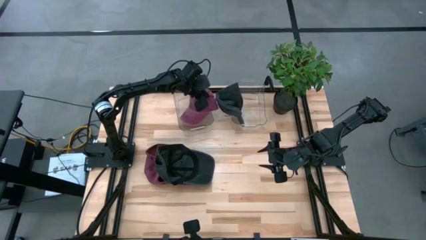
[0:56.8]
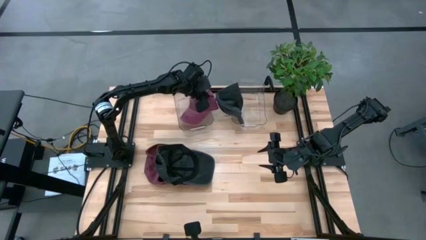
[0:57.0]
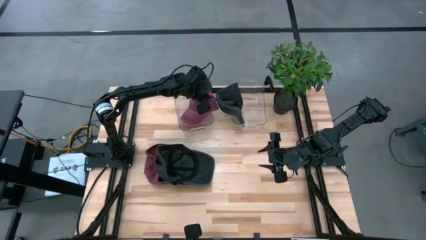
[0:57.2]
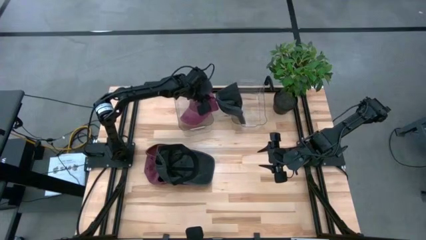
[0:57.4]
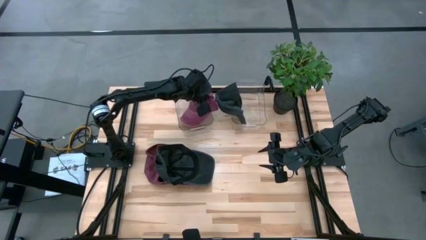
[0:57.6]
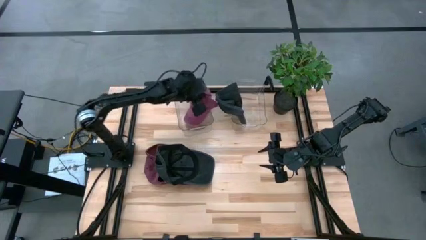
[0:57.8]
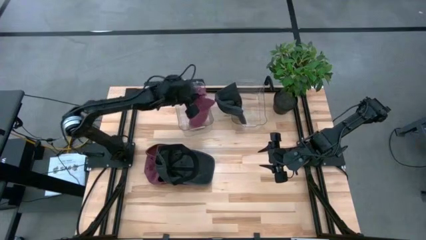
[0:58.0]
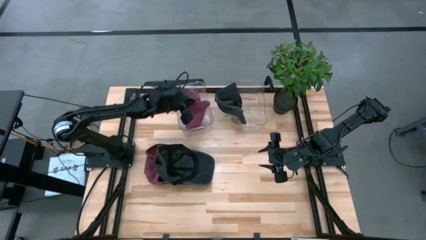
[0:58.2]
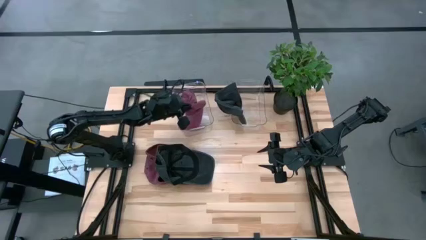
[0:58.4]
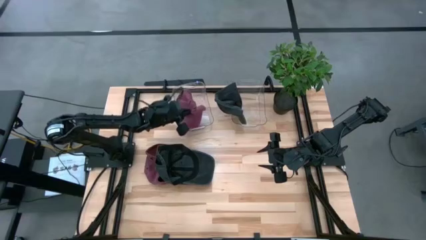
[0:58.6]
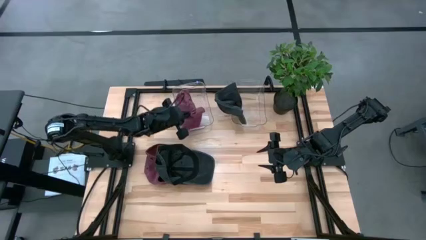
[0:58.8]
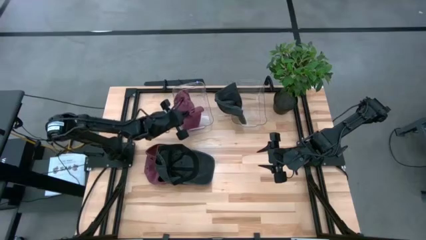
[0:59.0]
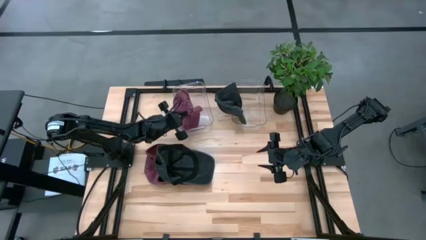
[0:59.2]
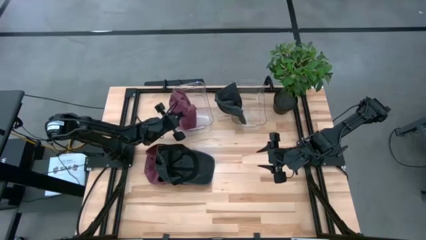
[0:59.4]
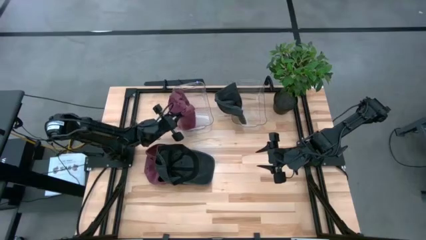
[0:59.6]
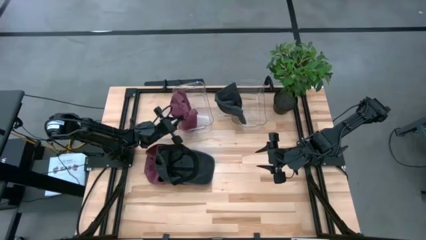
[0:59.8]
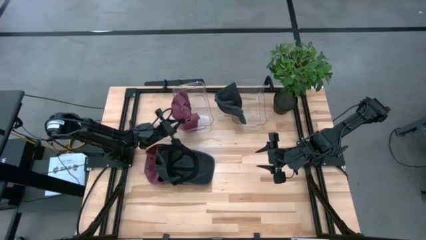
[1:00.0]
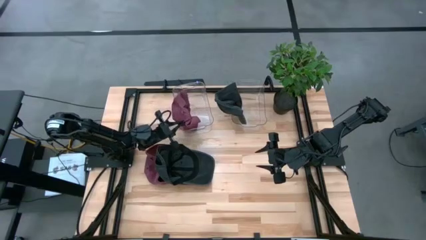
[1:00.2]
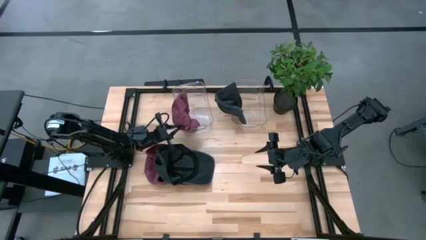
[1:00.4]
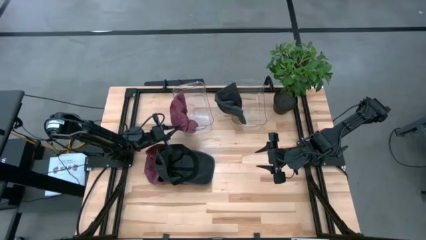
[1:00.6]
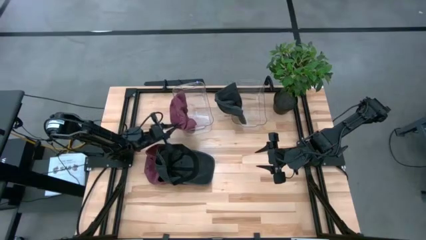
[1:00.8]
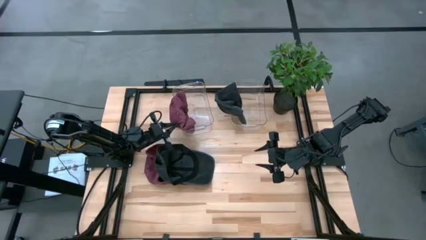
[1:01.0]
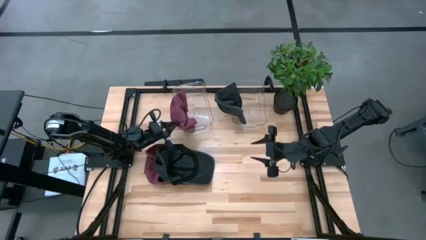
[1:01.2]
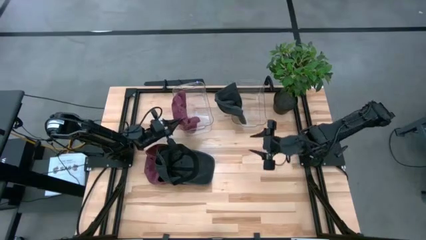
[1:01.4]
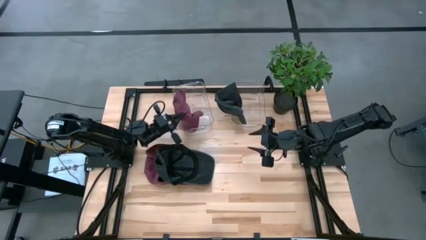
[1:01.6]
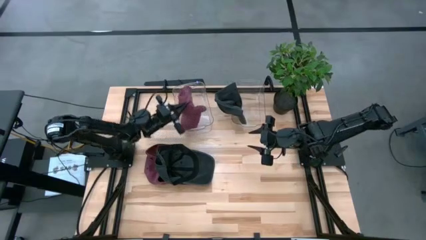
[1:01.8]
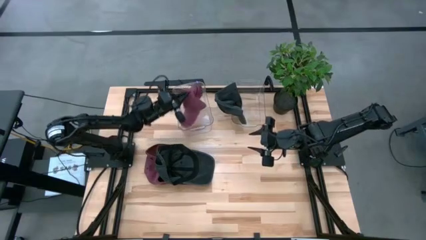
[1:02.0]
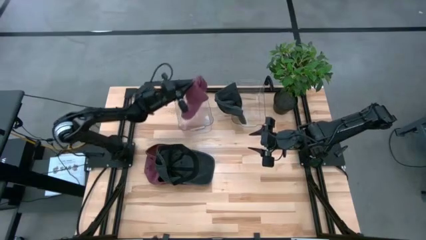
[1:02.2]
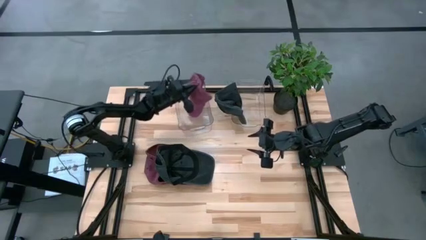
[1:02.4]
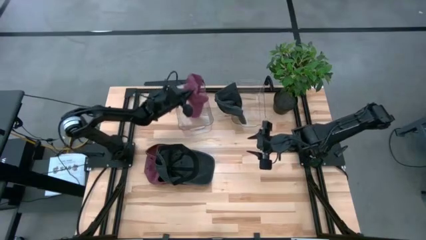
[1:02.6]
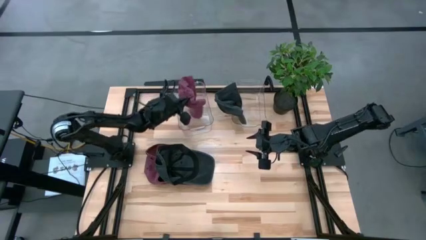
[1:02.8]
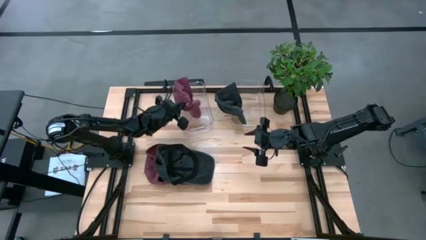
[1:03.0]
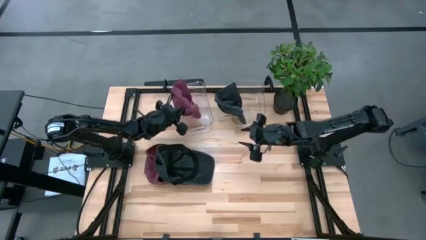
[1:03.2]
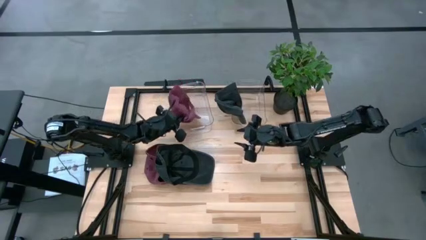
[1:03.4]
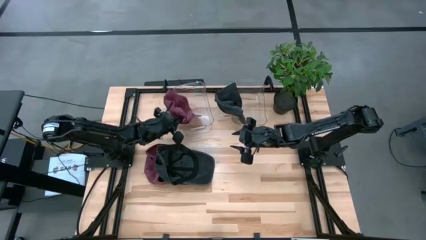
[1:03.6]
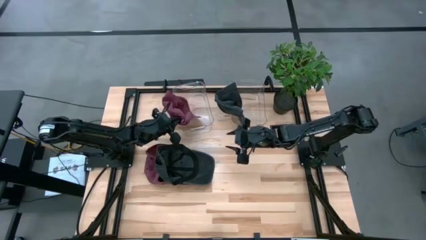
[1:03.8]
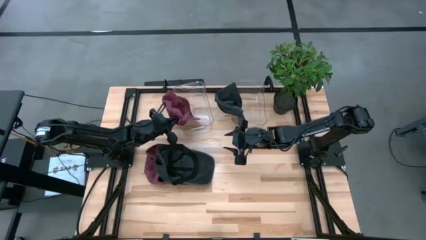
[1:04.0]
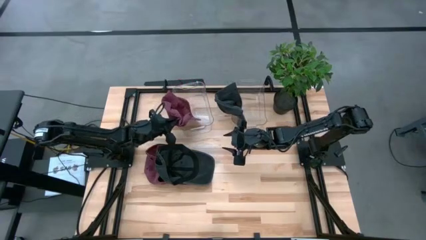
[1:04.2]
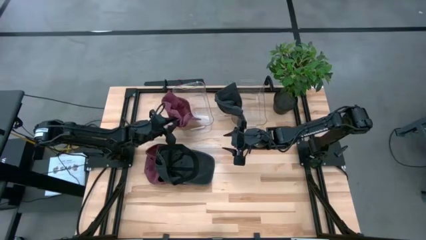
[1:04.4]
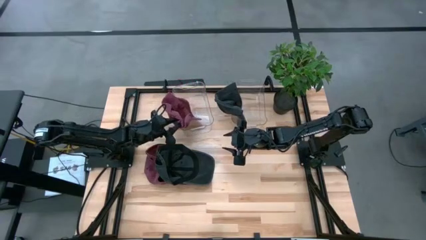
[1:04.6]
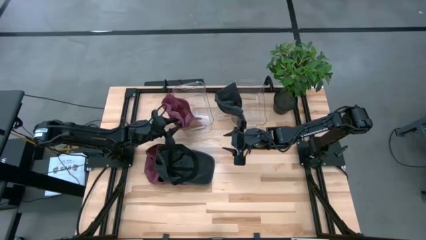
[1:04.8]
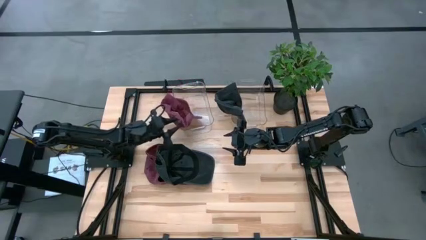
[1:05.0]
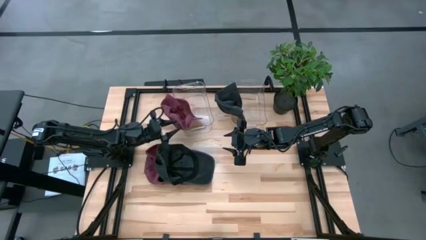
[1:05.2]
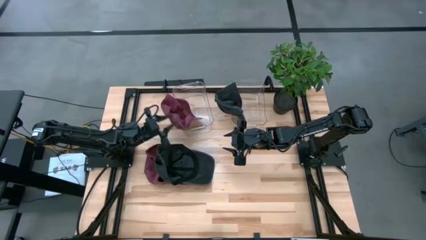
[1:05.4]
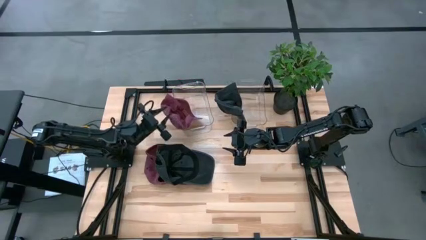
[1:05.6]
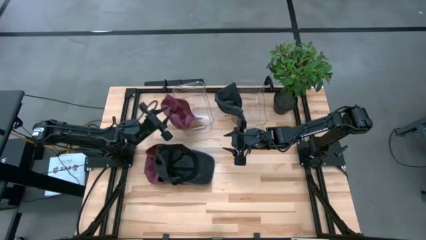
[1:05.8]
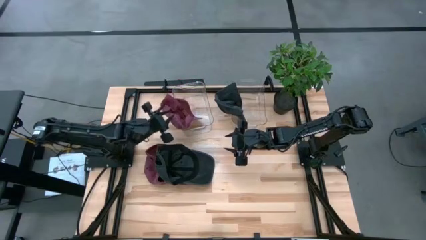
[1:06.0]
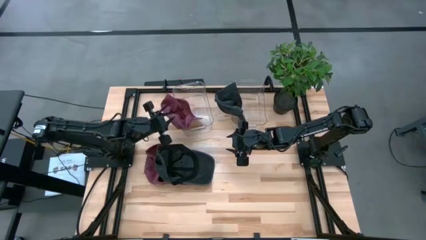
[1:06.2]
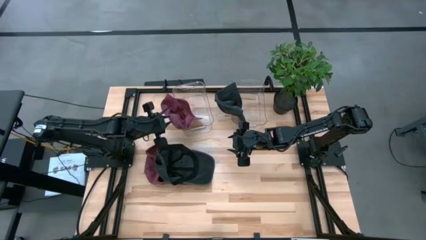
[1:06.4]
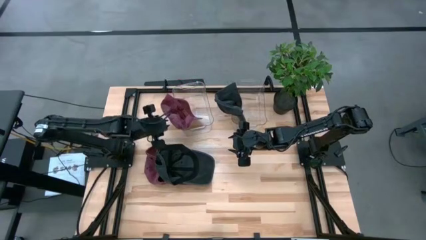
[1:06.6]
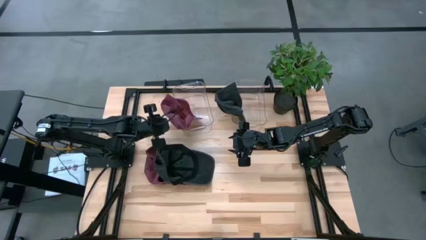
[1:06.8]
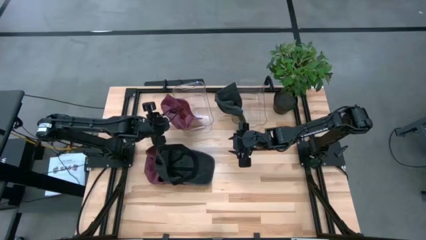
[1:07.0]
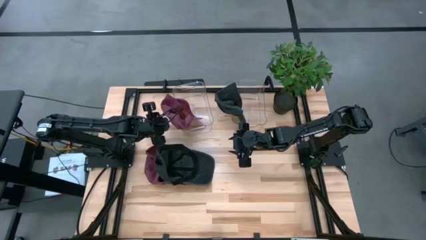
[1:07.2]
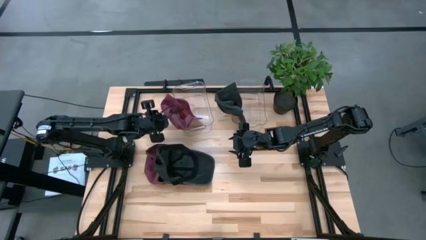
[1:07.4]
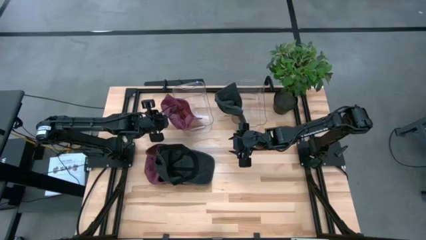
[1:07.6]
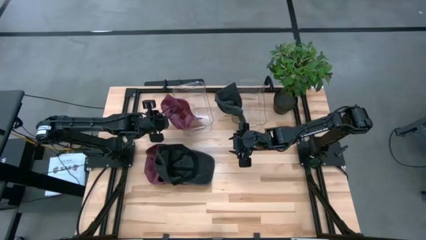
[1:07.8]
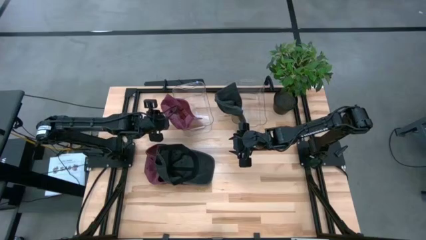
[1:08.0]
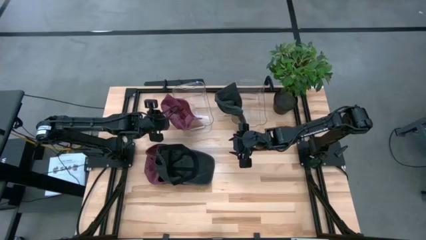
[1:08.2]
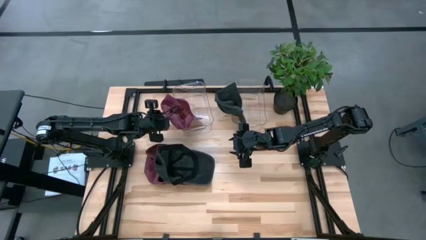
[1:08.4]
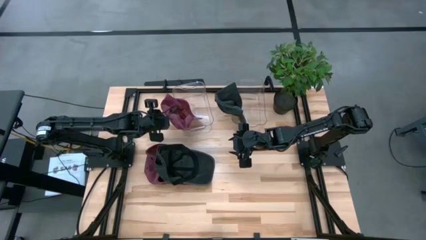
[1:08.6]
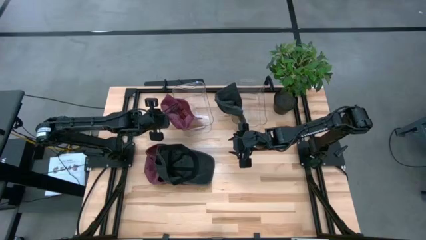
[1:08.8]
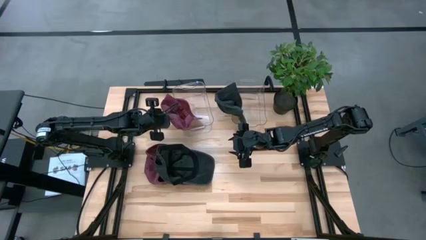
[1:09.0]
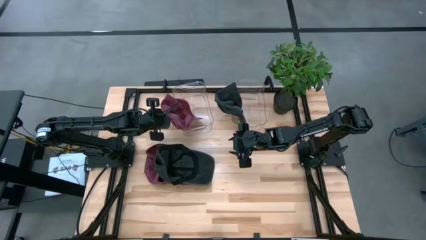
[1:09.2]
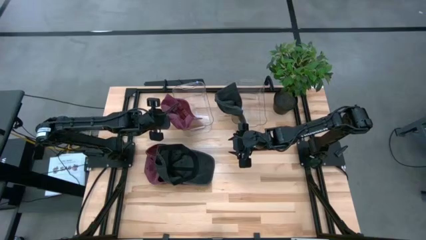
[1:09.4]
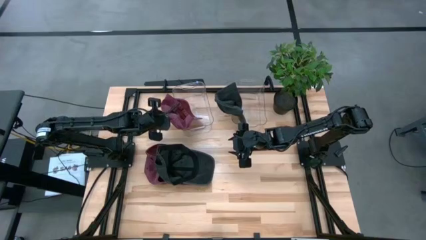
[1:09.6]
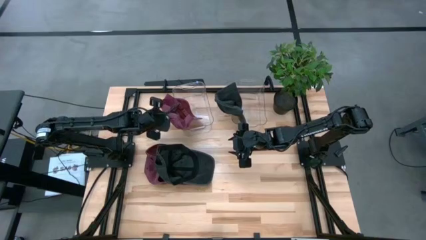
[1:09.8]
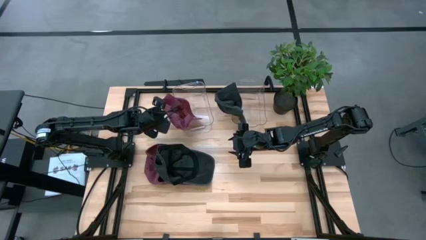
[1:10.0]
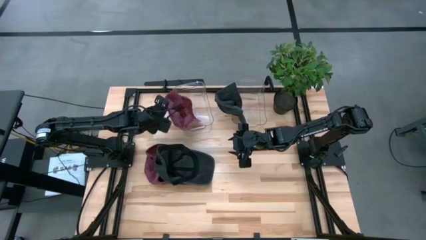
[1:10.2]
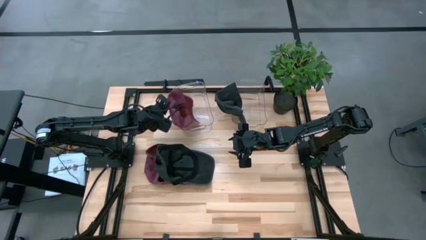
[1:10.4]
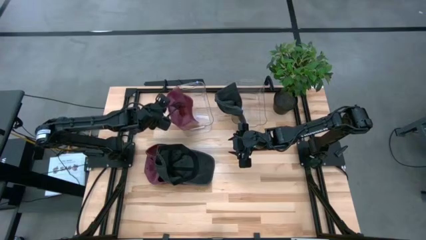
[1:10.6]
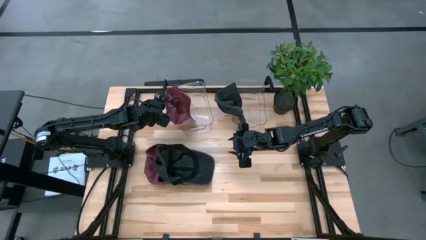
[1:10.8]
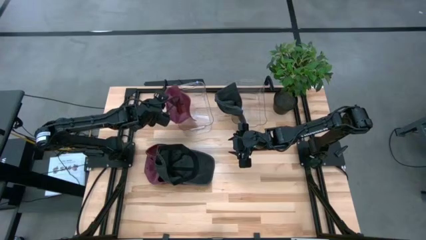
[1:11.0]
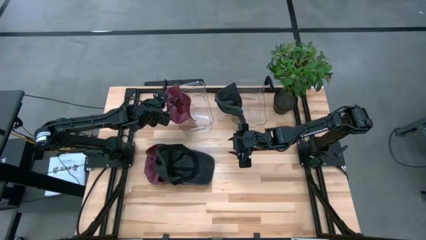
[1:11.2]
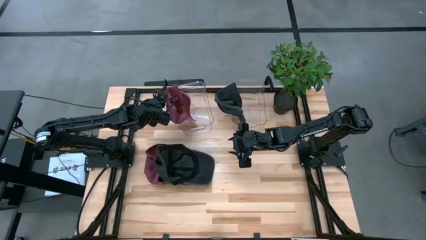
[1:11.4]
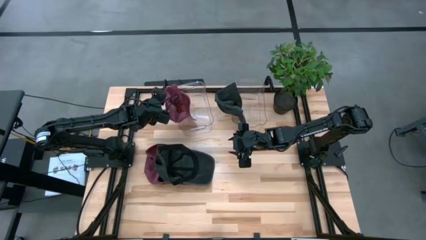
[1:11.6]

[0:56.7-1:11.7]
Task: Pick & Place hat
Put the right red cap in the left transparent bin
